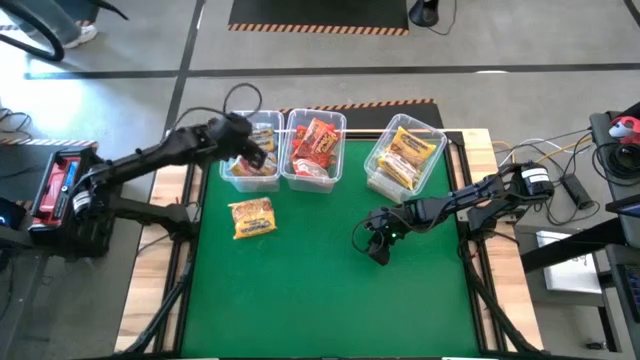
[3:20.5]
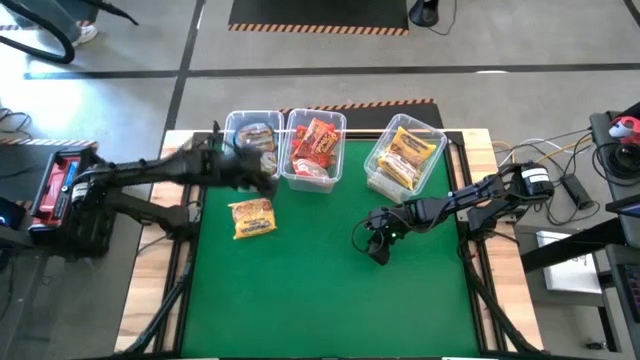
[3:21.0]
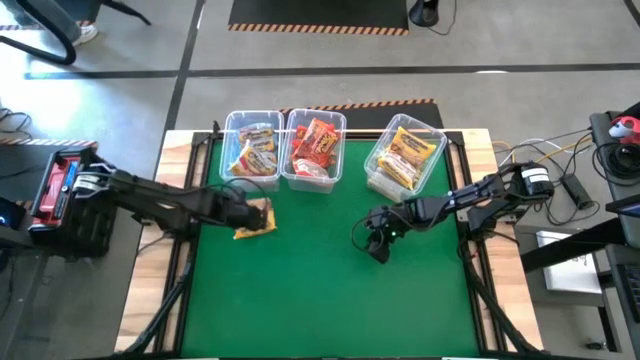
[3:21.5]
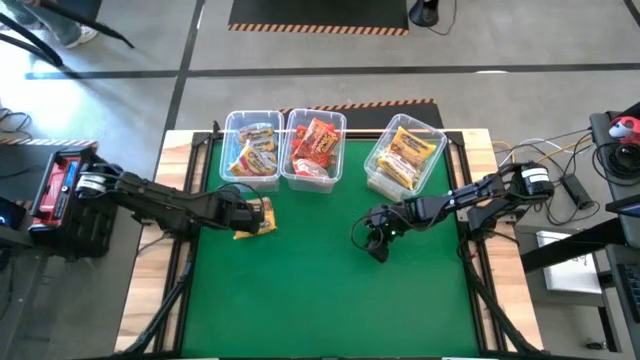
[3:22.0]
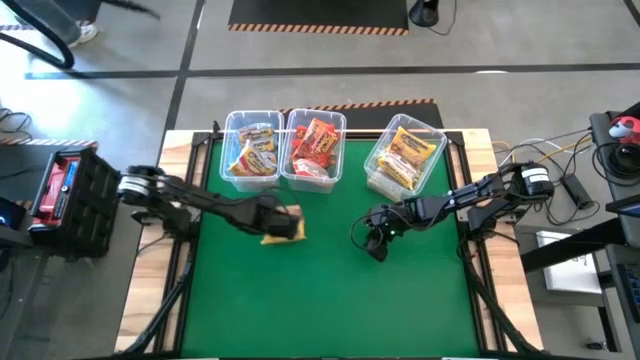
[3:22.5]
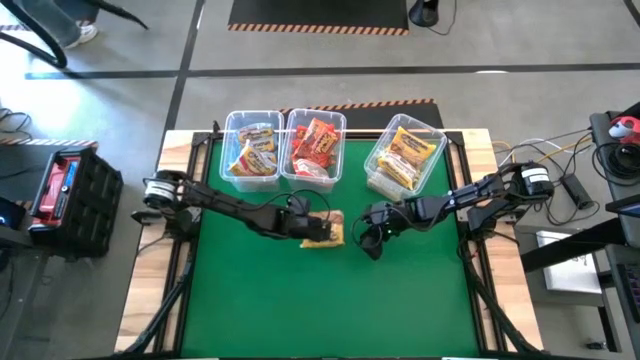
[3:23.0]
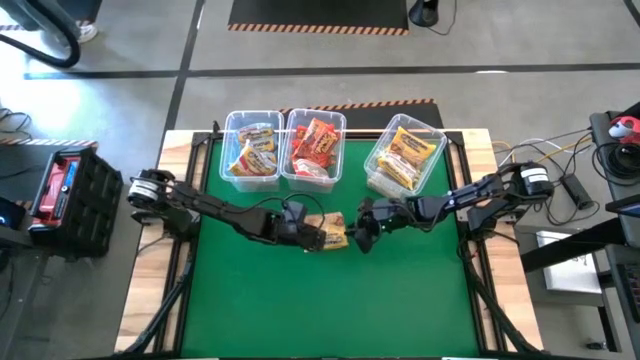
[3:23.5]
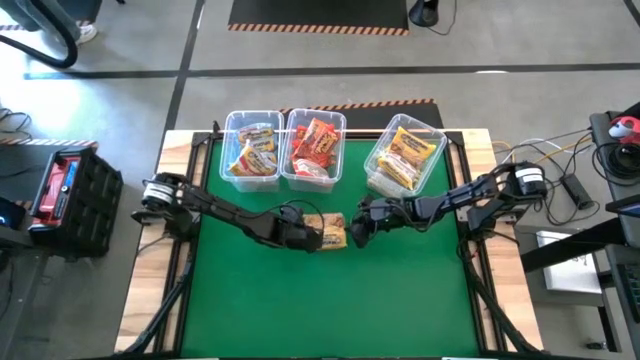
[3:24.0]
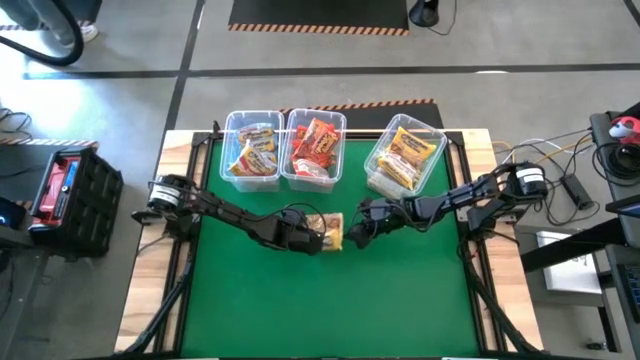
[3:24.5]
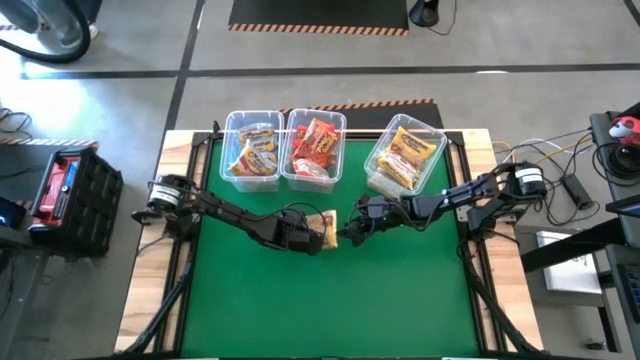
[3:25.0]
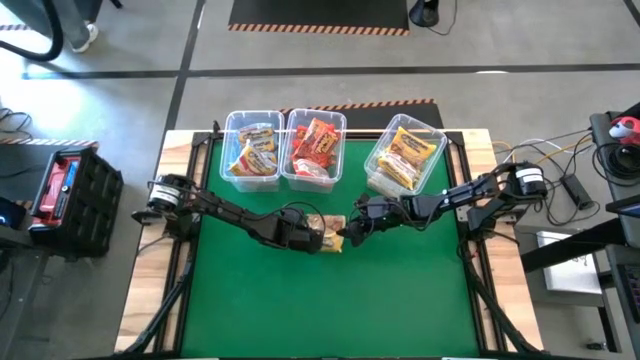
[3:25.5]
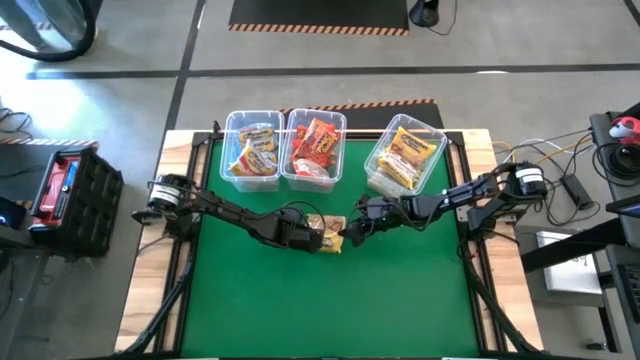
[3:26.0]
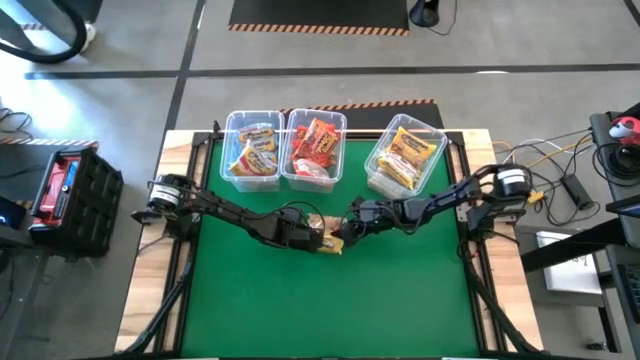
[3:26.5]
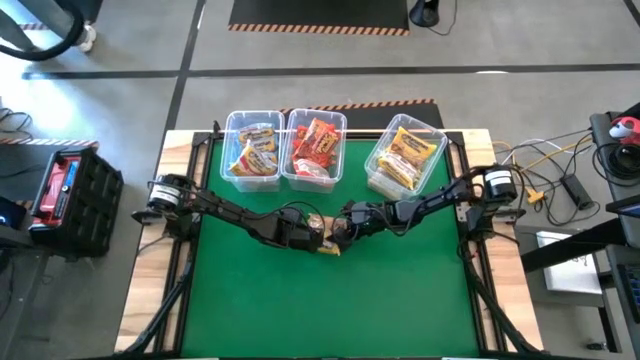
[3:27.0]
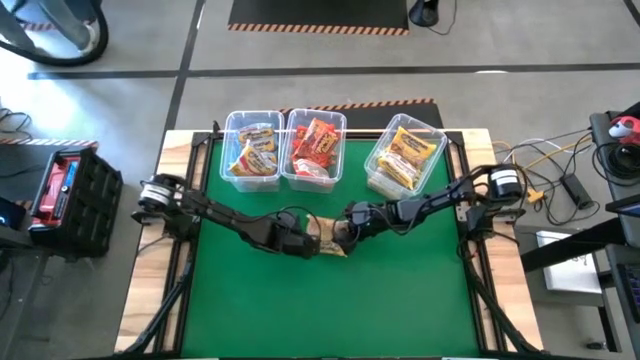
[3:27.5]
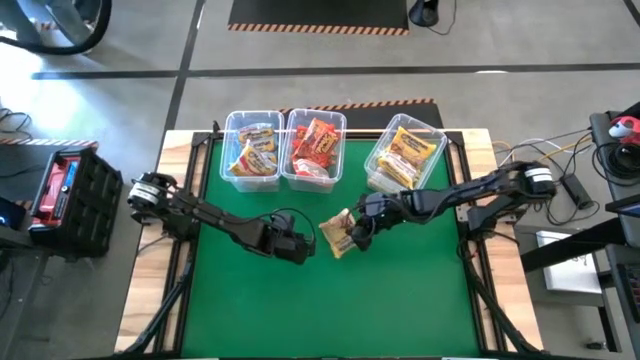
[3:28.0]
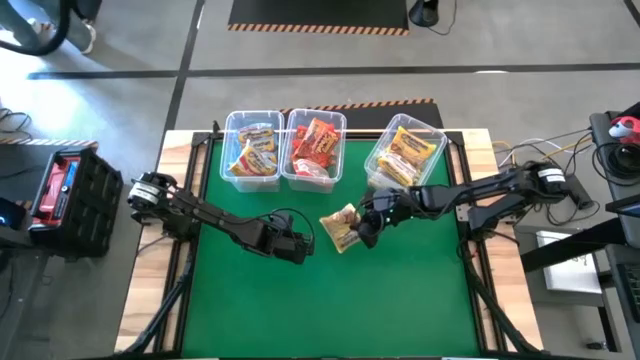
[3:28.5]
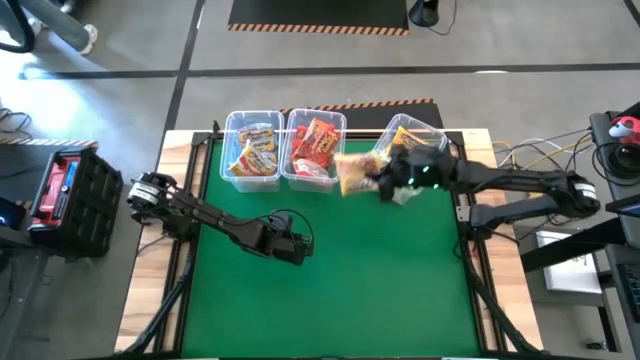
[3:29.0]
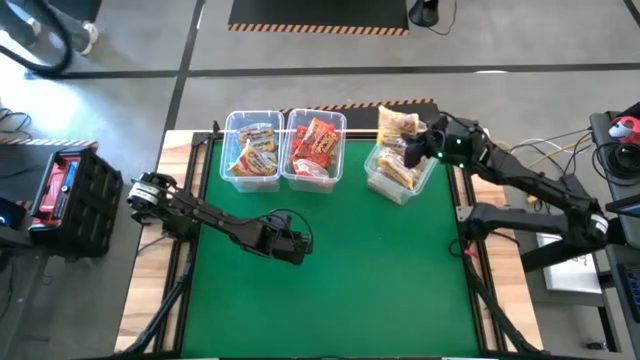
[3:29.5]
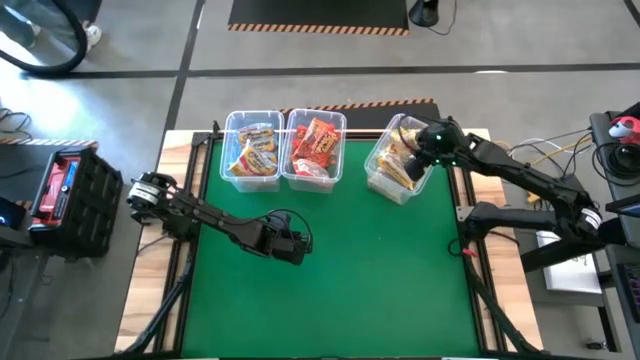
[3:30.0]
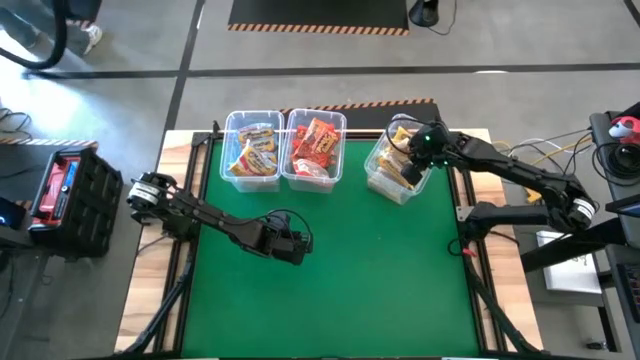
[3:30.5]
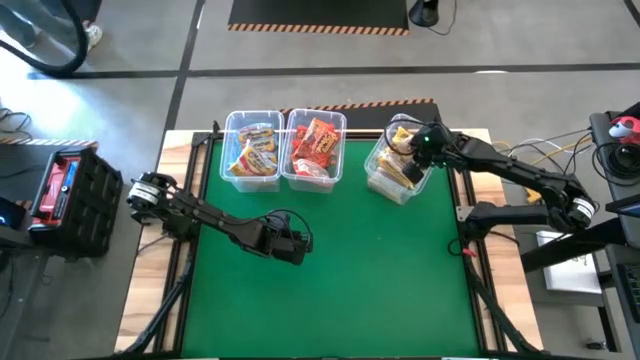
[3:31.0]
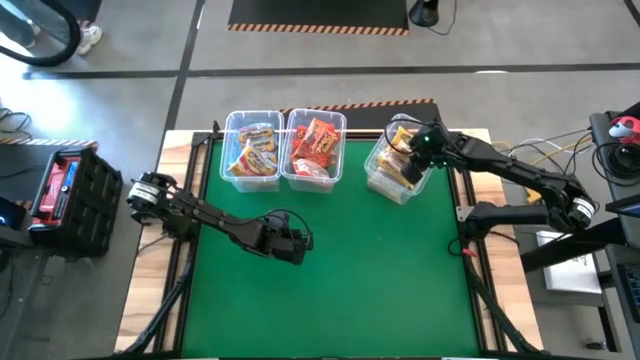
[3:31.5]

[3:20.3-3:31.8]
Task: Sort Maruchan noodles
Put the yellow noodle pack into the top right transparent bin

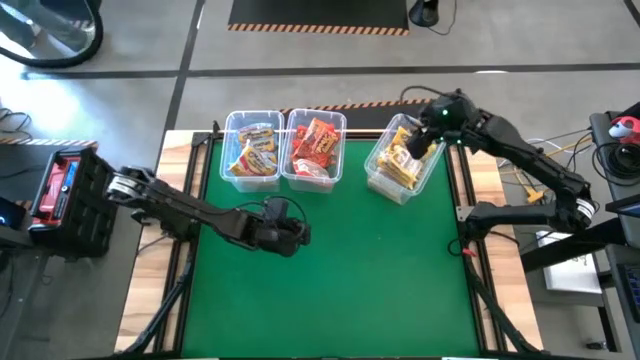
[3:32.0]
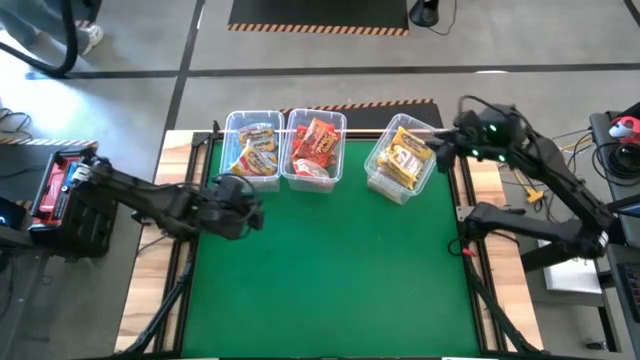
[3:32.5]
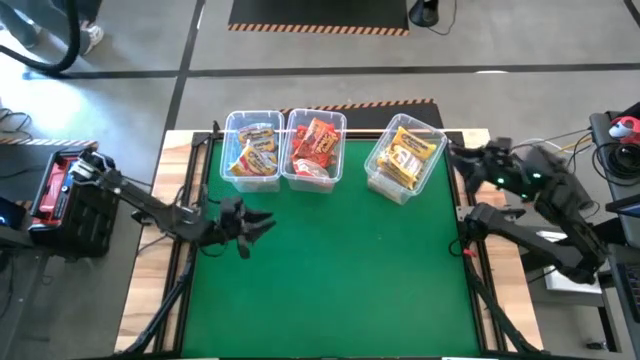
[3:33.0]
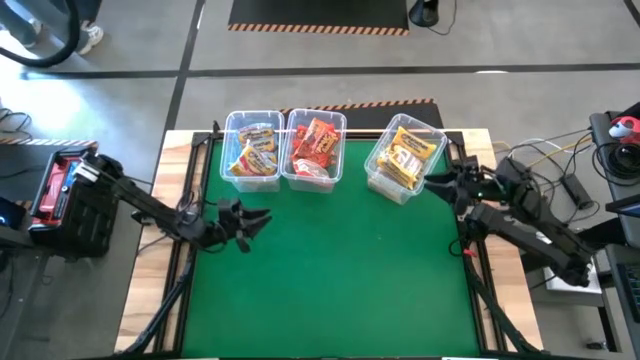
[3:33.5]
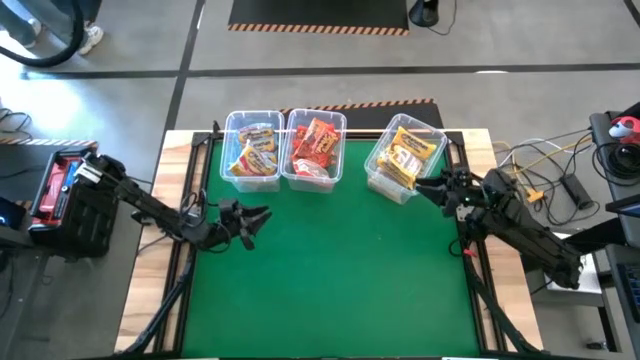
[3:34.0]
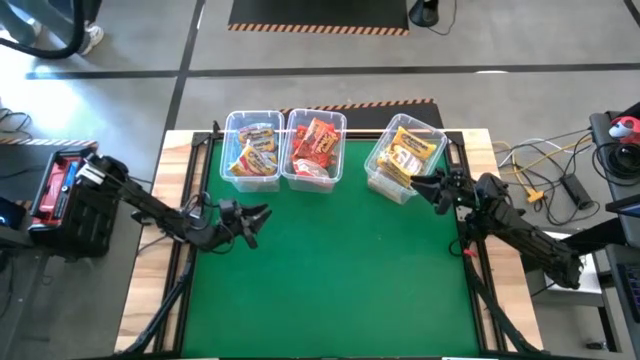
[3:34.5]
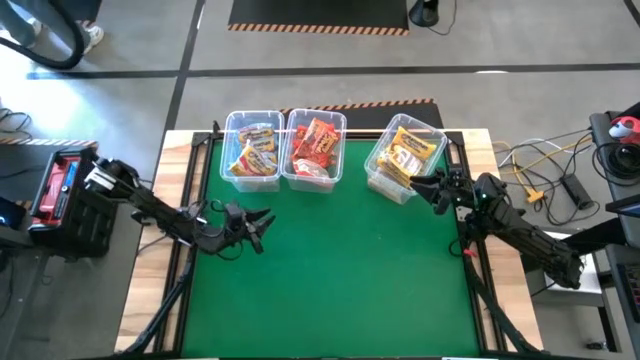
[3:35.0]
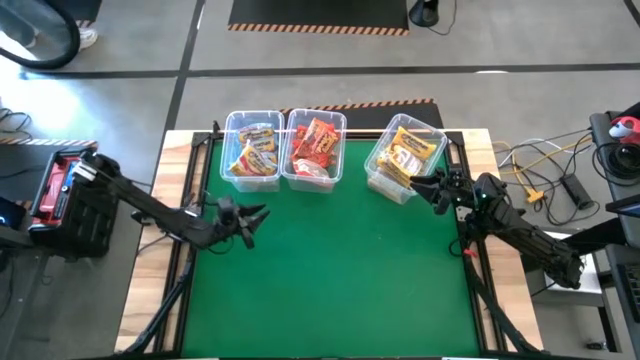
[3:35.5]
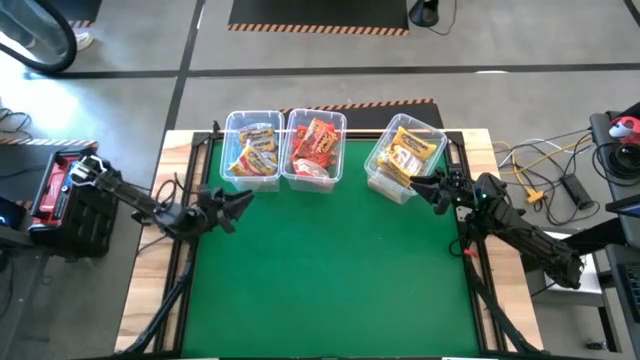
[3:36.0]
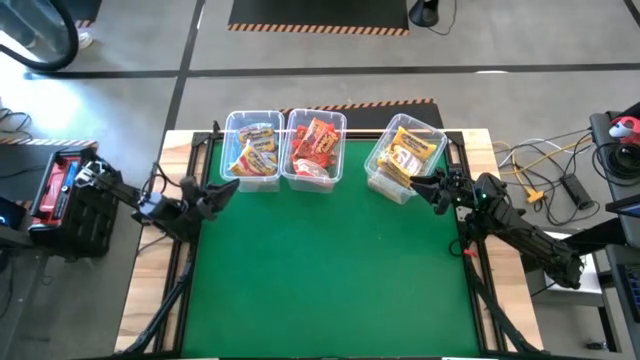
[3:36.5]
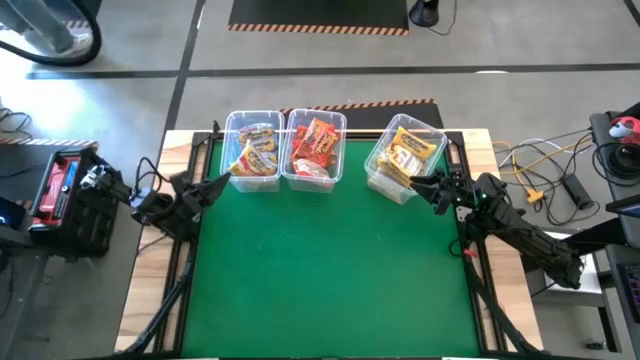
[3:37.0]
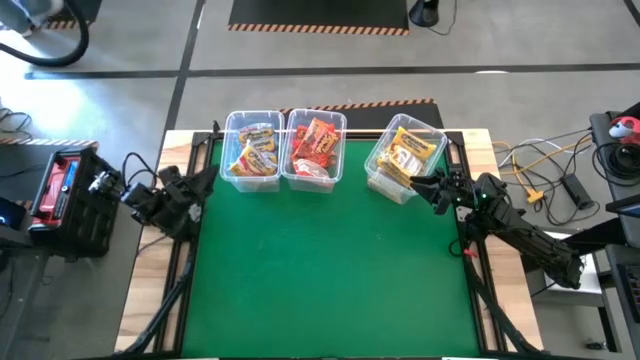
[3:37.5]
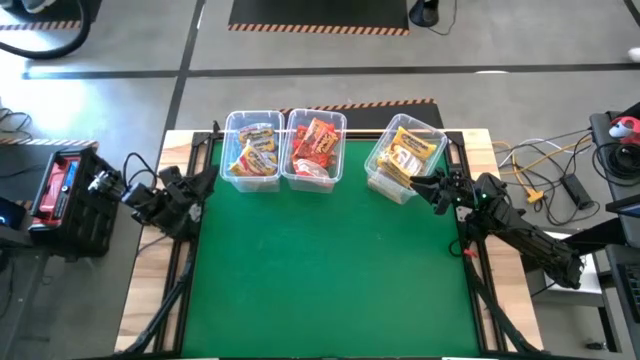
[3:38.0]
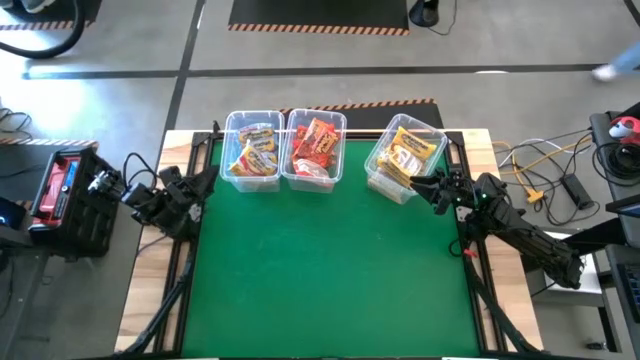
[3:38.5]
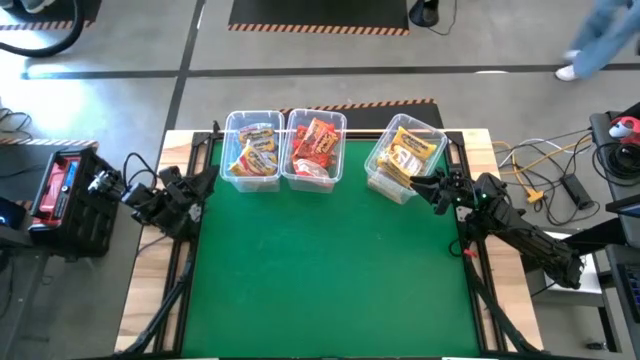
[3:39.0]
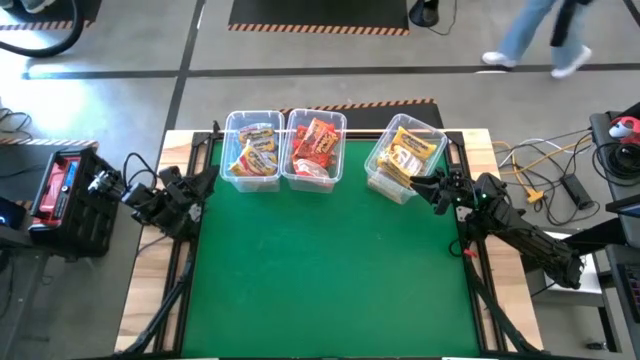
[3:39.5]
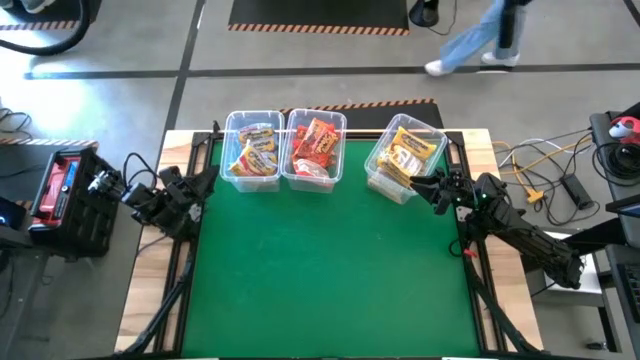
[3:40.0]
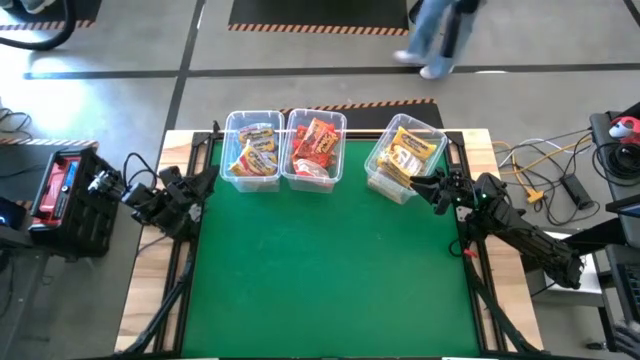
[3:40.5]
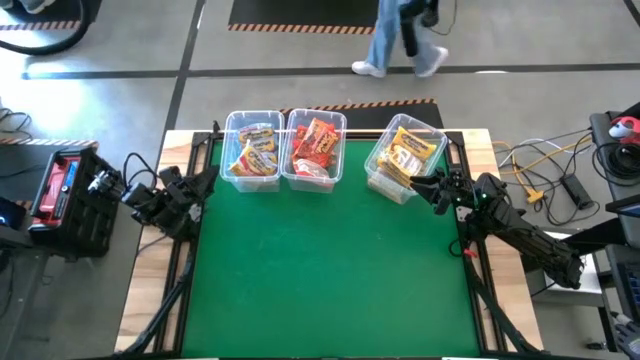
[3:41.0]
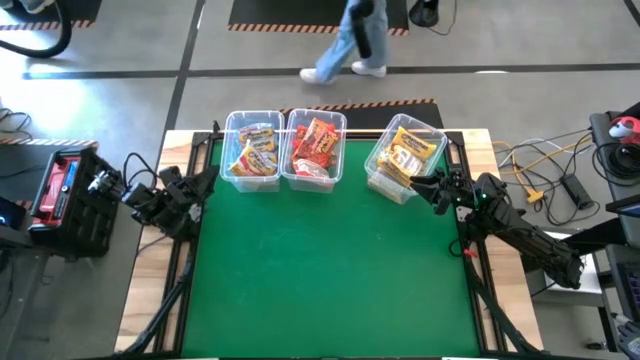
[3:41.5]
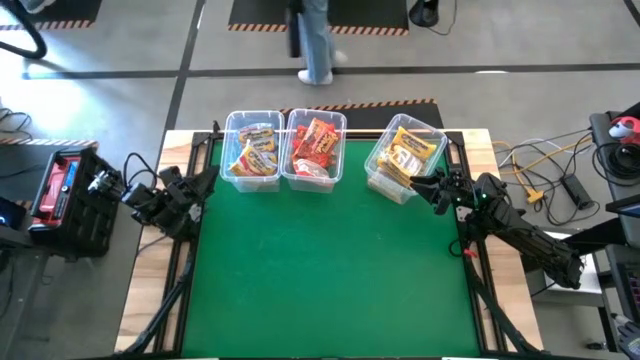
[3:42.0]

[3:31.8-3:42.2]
Return to Home Position
